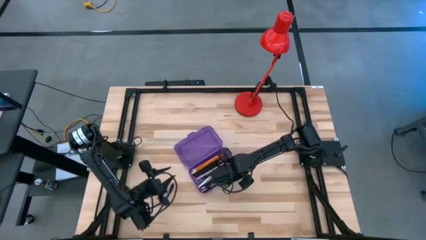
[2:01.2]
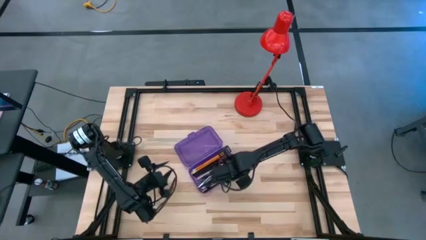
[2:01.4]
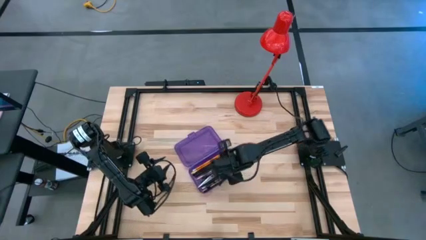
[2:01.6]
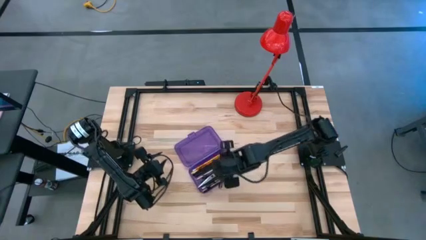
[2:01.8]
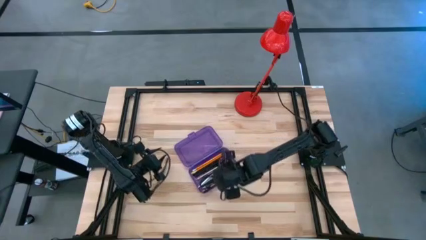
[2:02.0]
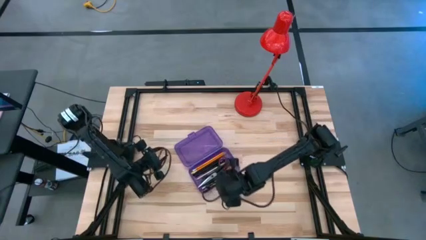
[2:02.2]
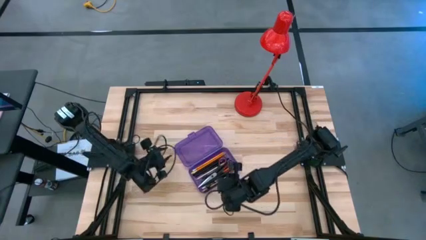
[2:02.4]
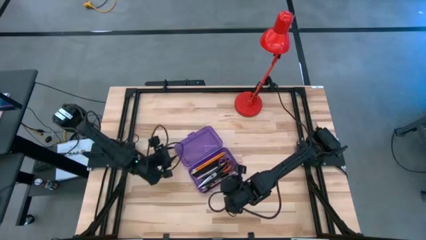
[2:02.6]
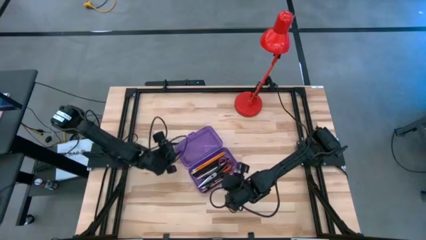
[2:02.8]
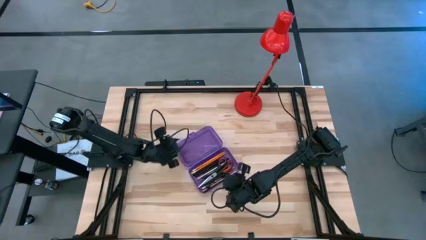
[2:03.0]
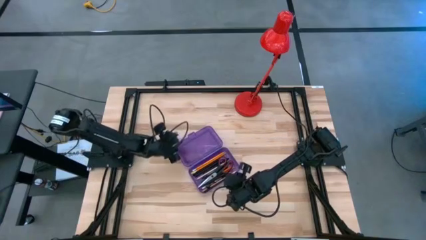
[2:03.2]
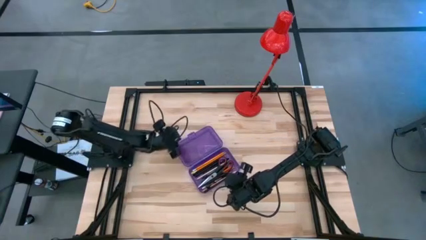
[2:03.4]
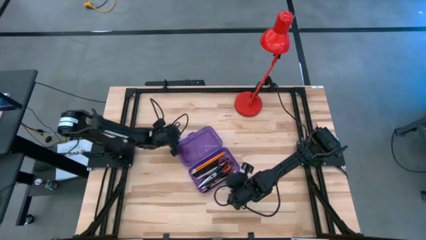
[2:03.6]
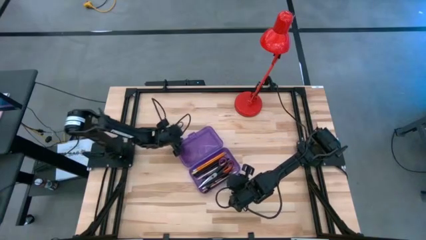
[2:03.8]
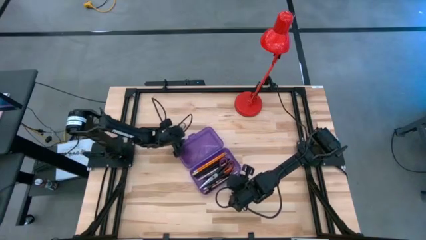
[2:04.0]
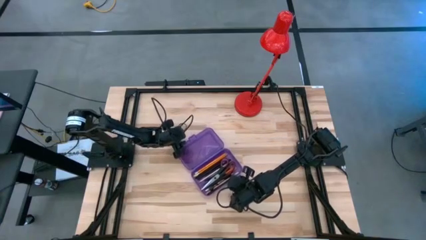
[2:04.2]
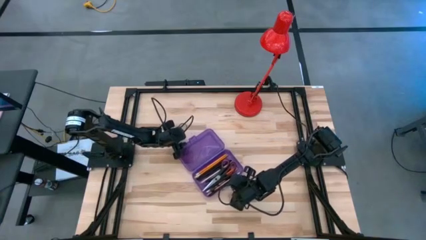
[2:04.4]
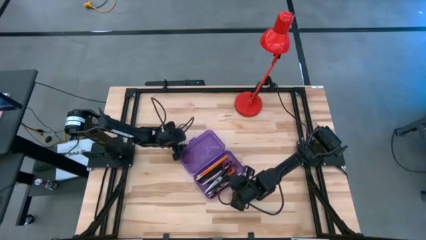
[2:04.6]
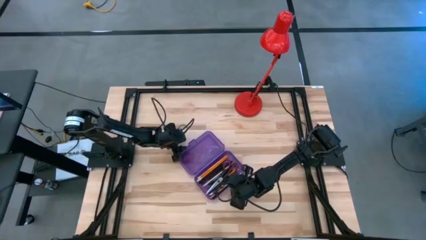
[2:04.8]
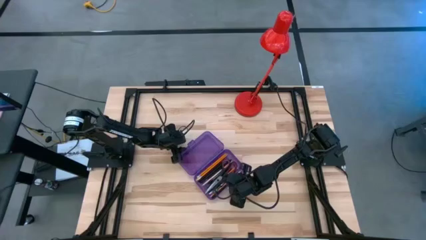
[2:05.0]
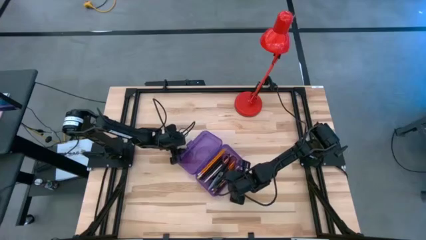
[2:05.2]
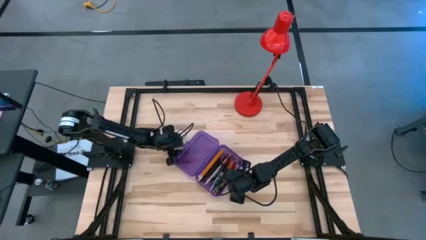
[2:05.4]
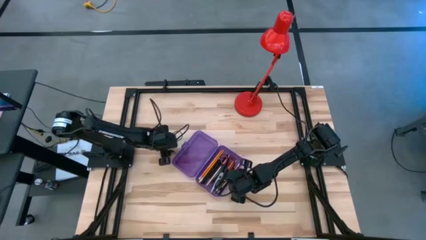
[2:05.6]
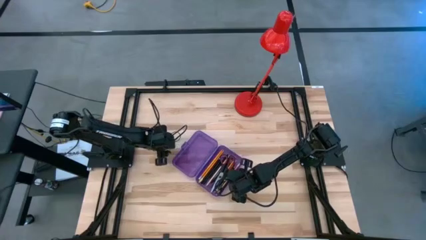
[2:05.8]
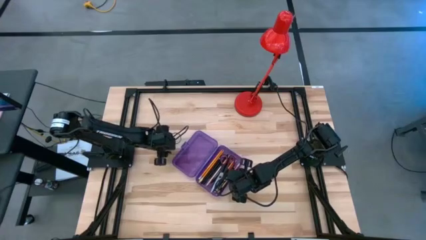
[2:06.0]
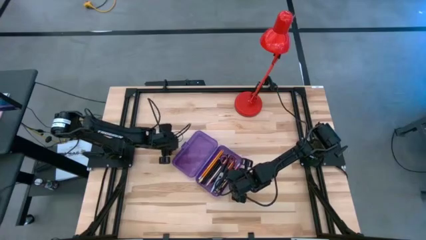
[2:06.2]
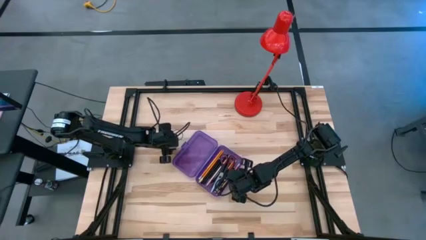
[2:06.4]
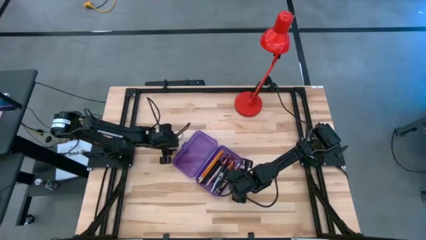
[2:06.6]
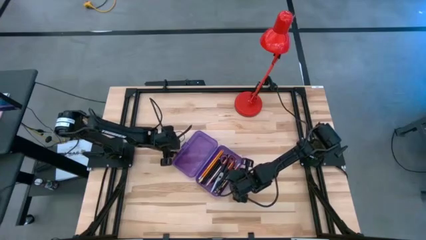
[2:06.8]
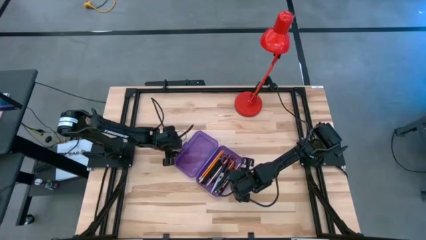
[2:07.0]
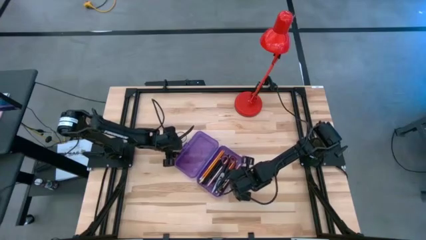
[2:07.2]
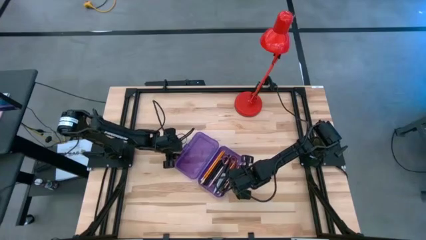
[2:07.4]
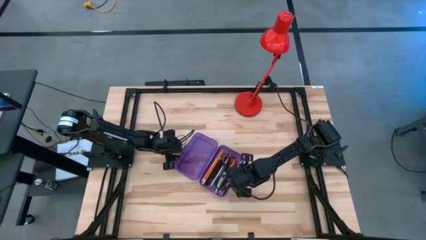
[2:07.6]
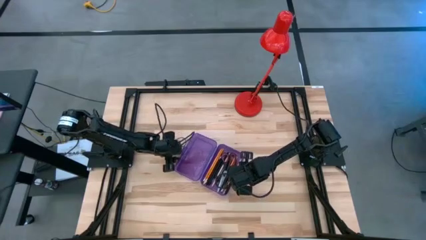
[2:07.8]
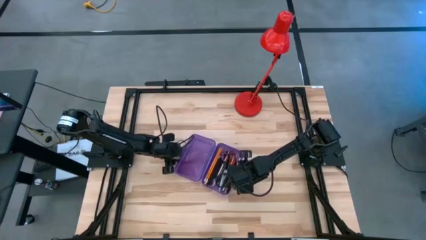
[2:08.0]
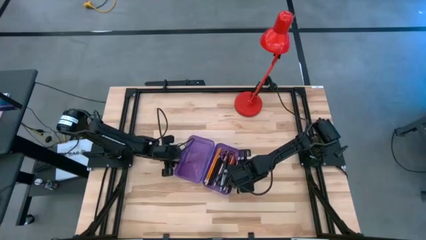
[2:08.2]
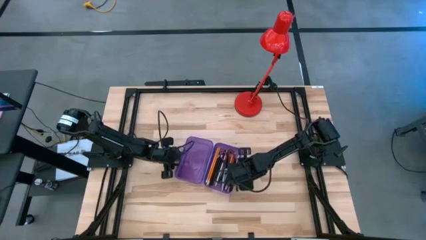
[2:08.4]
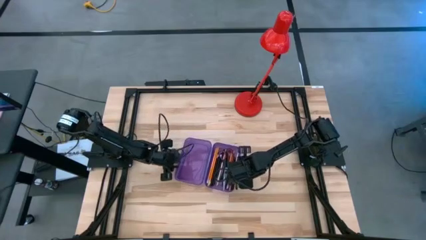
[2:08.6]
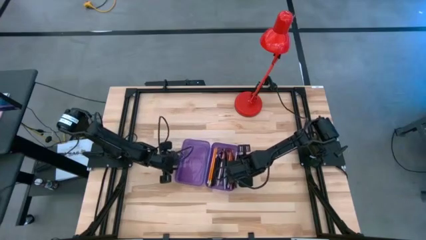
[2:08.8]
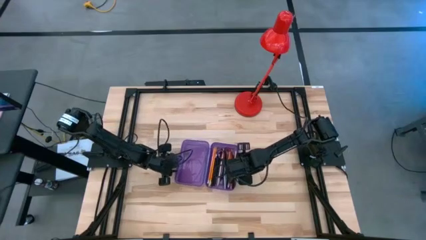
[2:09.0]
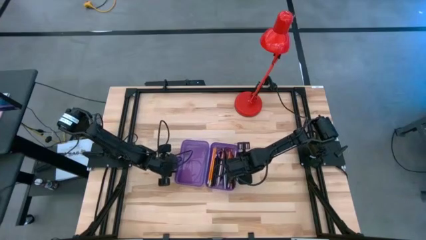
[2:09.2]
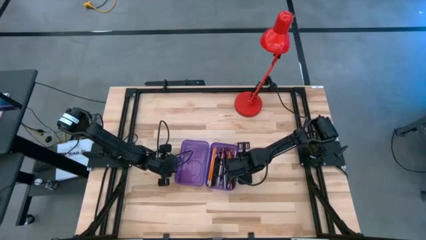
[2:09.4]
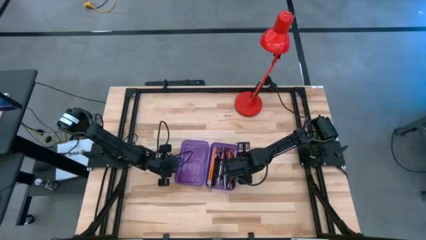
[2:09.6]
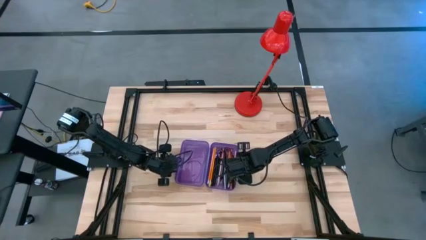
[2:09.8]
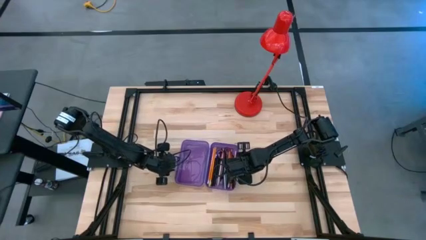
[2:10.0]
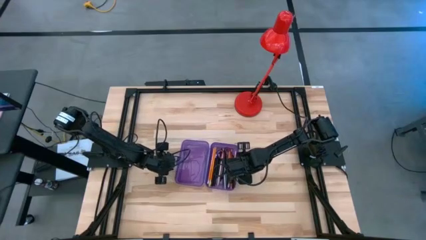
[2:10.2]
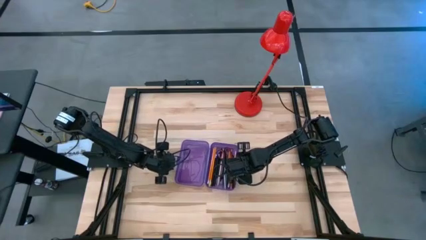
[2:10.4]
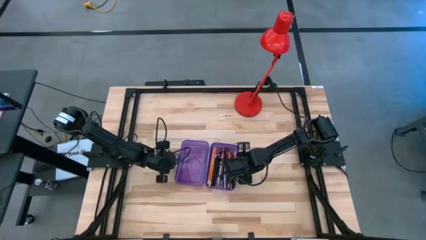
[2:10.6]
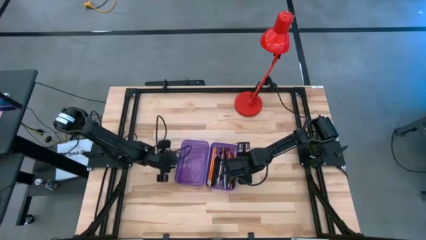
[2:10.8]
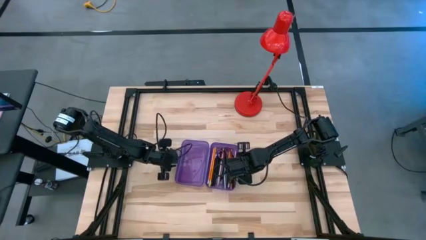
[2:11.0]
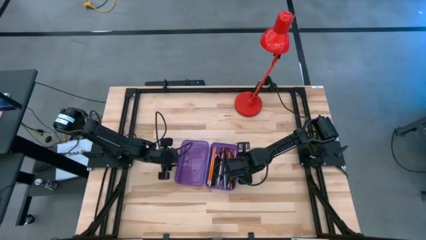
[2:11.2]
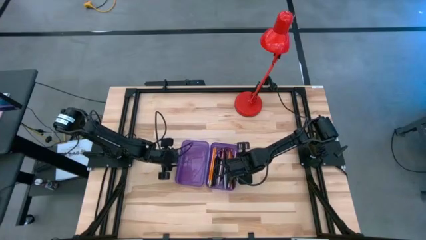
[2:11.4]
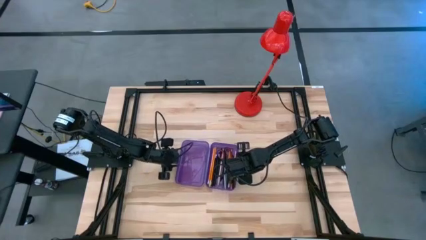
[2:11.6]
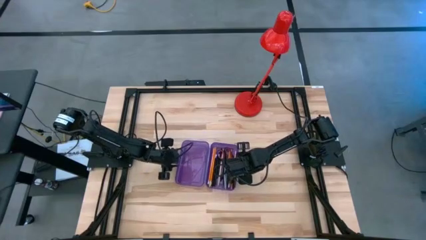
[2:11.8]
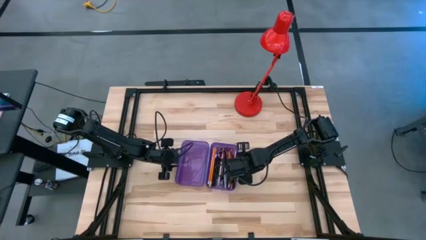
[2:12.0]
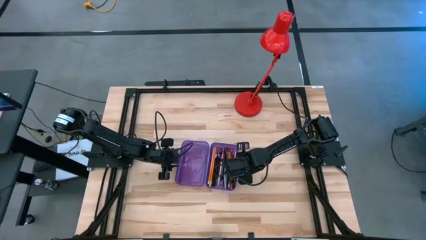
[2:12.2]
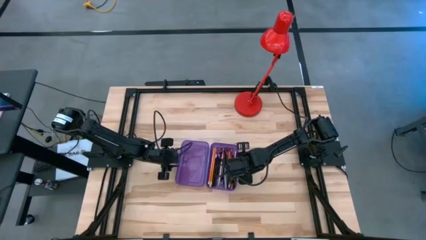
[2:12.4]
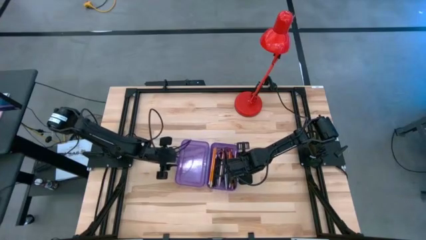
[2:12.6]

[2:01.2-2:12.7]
Task: Pick & place school supplies into a supply box
Close the purple supply box
